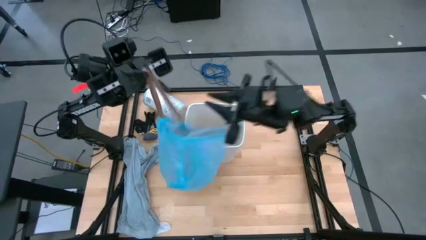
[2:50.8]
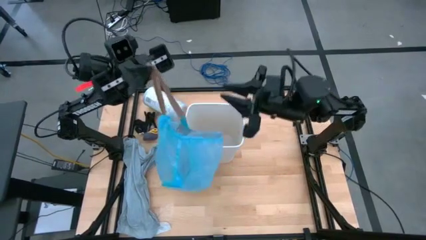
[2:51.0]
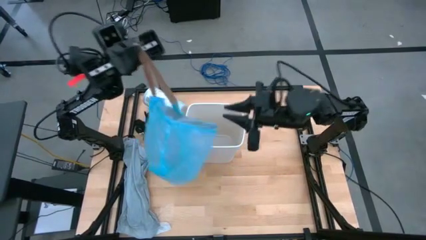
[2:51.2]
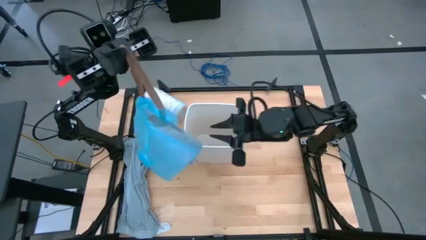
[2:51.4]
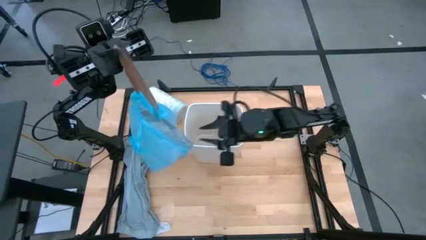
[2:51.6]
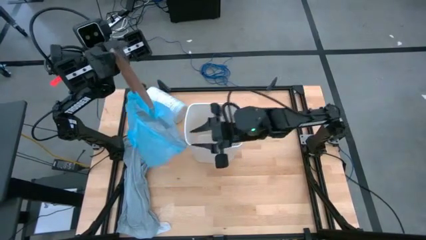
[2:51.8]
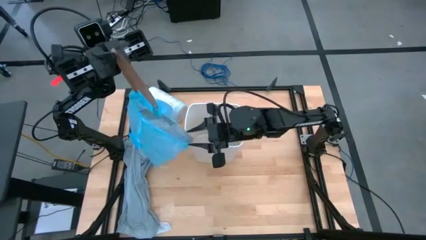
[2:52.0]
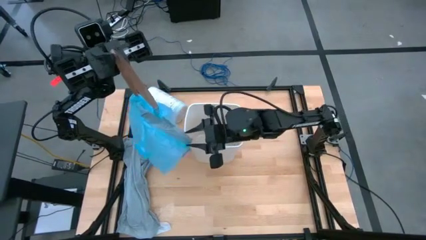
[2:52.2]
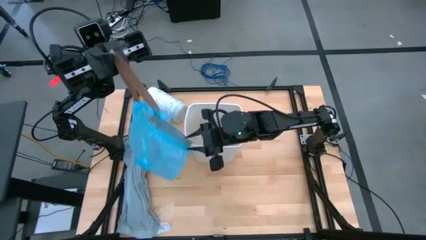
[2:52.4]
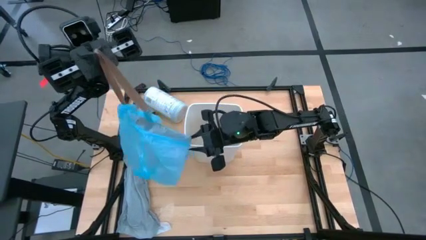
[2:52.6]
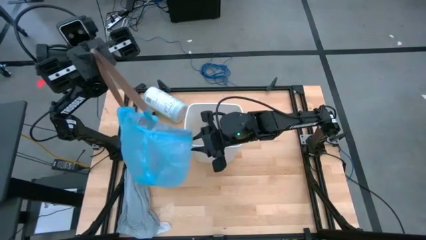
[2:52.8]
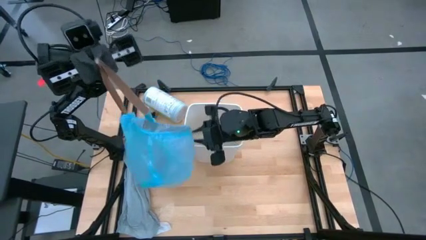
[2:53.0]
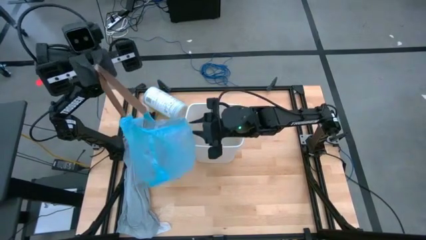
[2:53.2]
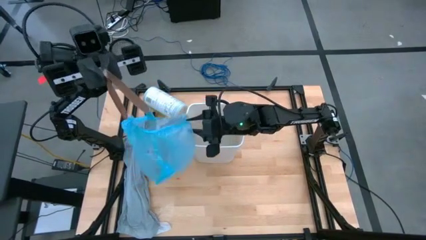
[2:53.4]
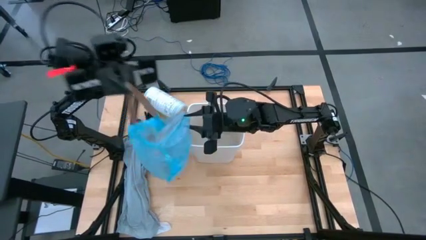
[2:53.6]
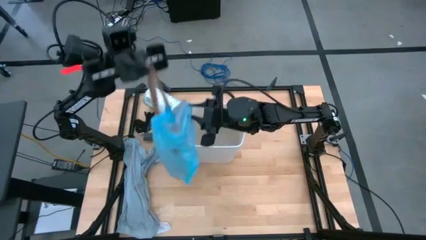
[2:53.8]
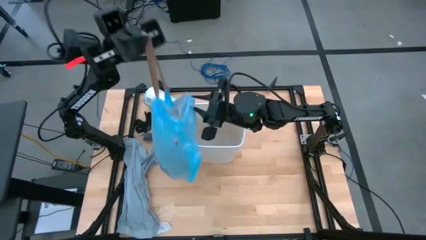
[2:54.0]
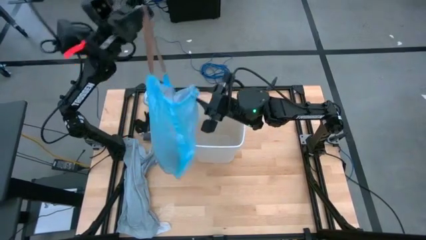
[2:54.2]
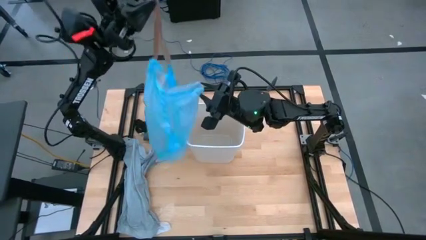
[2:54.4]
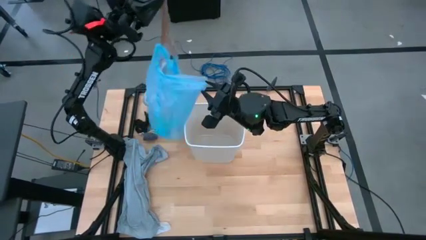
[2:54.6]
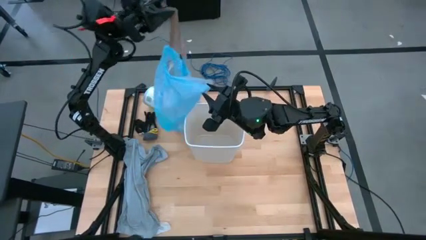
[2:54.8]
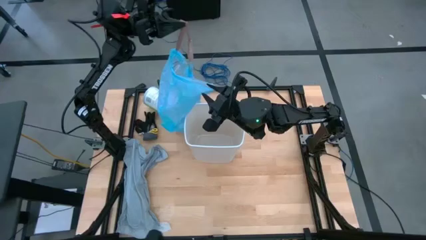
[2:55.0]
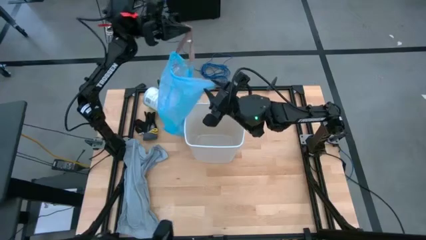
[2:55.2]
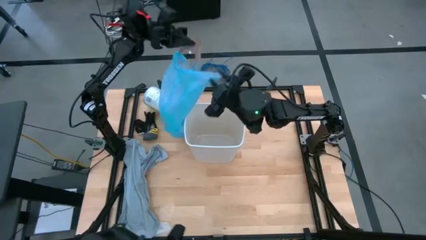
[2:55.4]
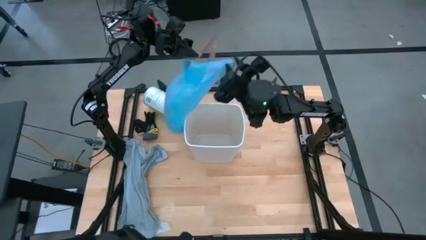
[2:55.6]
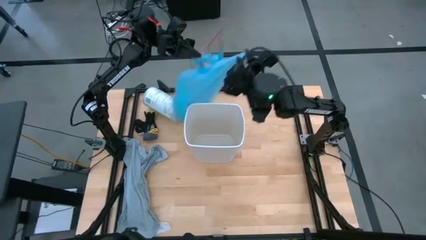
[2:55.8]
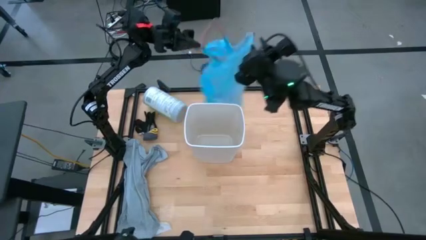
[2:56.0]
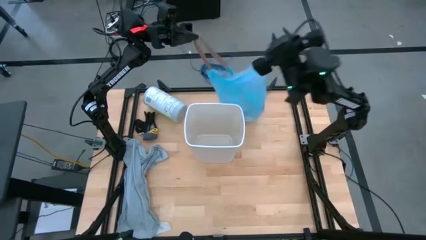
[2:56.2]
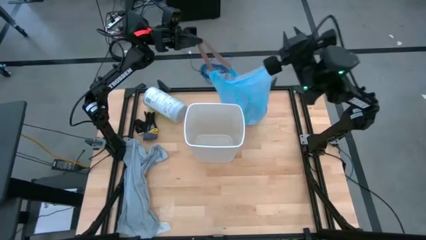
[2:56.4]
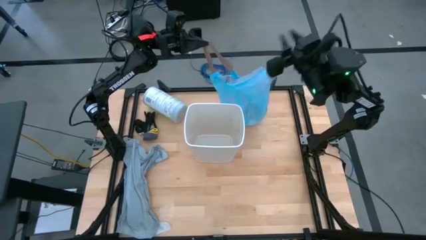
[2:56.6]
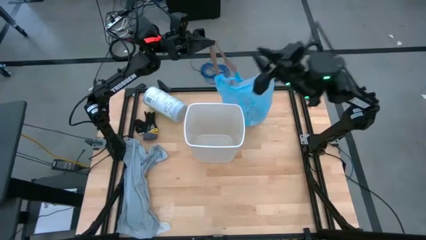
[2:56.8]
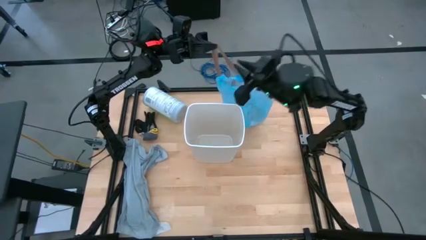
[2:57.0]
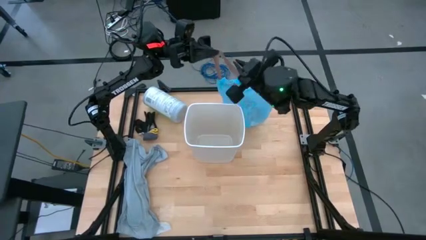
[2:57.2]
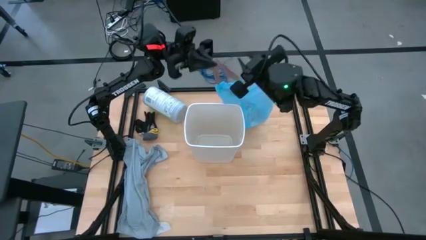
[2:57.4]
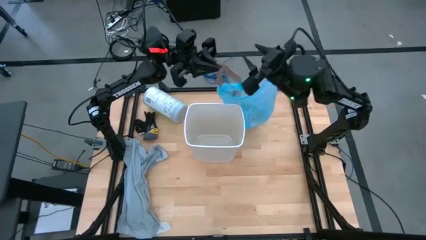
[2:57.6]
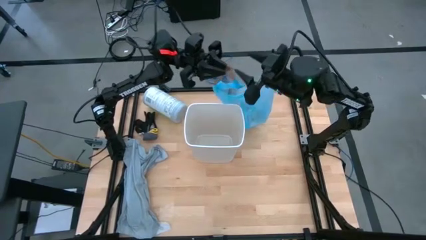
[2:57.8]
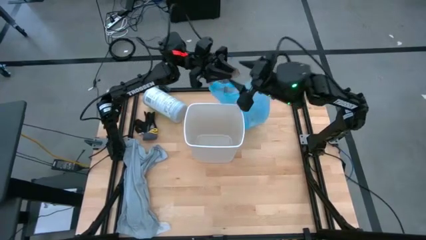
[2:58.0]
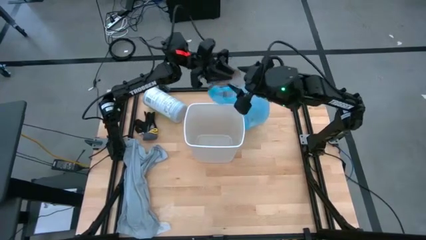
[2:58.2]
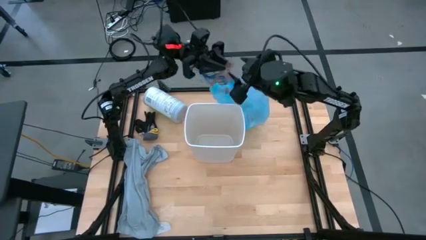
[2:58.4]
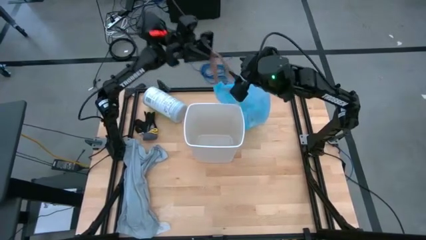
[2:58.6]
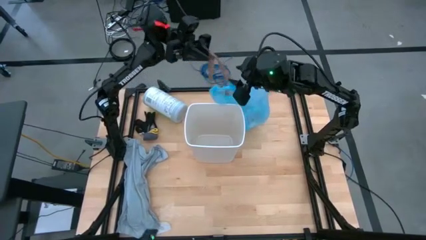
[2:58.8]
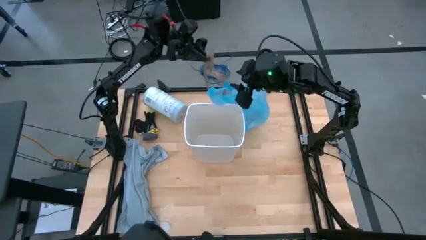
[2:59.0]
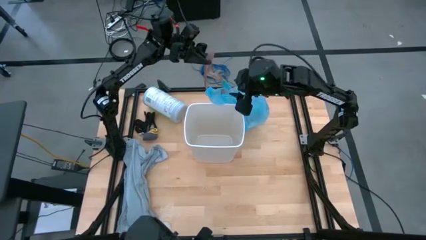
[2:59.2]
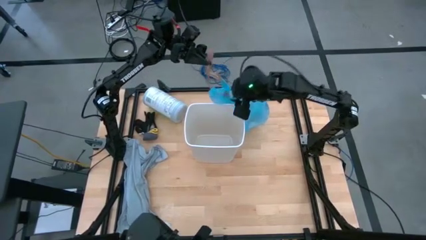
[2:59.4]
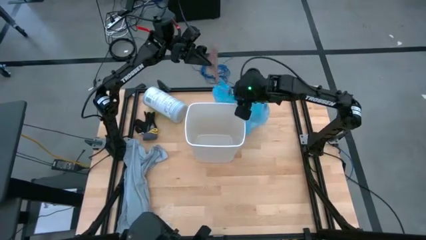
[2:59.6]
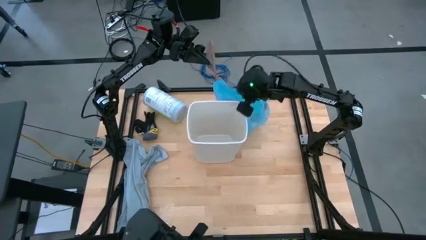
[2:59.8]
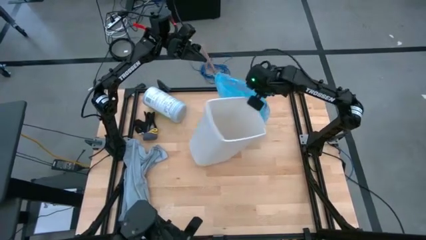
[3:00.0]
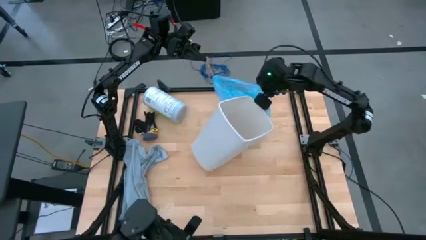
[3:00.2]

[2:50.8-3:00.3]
Task: place trash/remove bag and relplace
Put the blue trash bag on the table

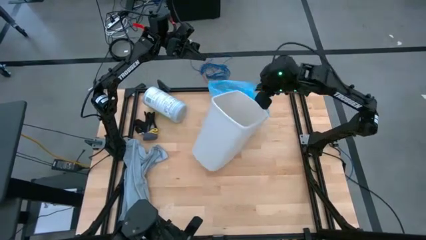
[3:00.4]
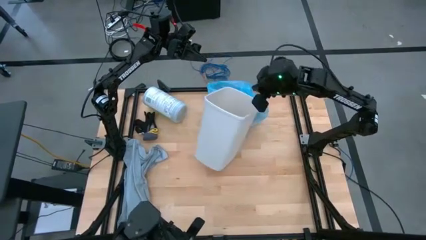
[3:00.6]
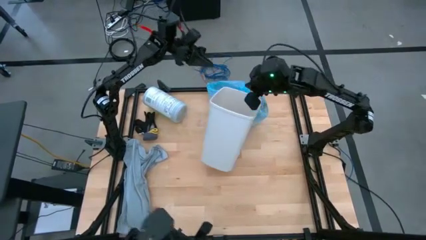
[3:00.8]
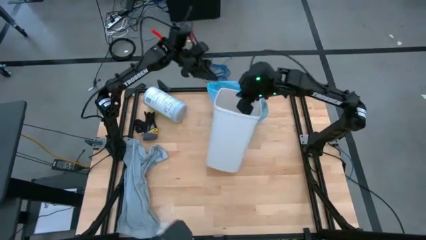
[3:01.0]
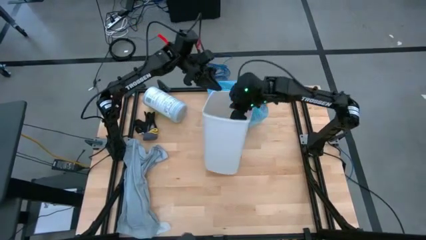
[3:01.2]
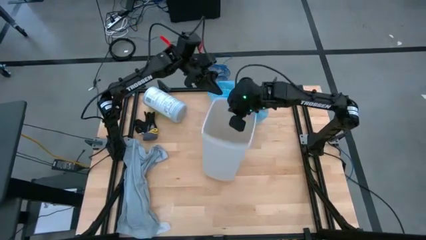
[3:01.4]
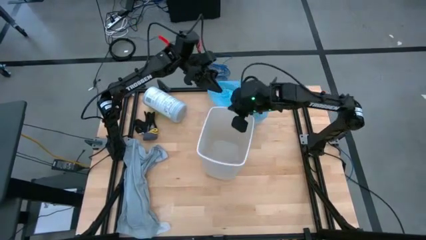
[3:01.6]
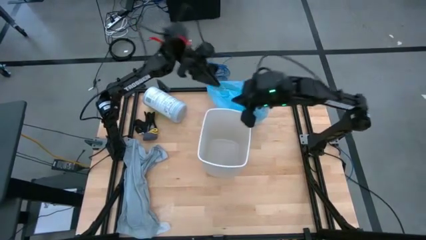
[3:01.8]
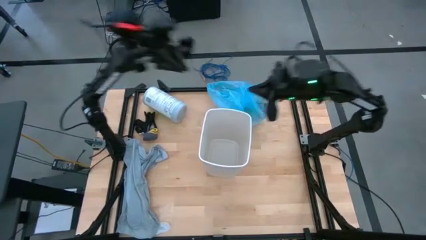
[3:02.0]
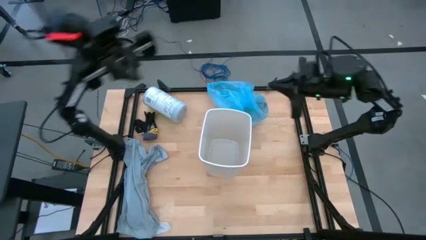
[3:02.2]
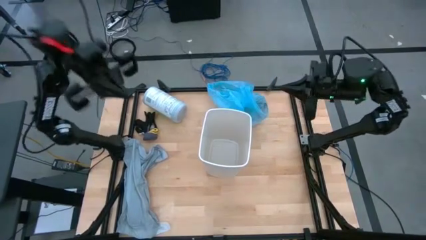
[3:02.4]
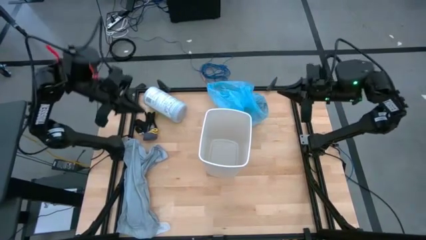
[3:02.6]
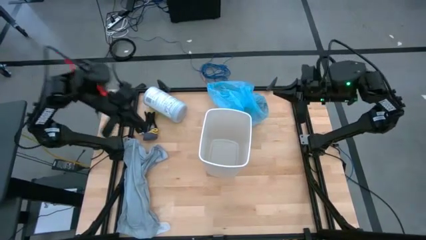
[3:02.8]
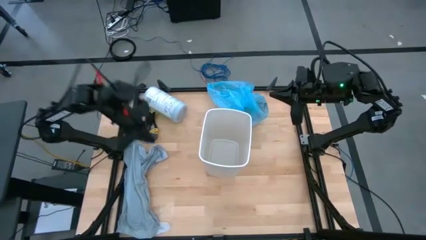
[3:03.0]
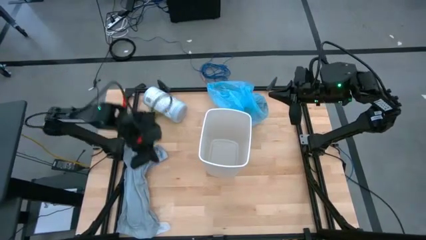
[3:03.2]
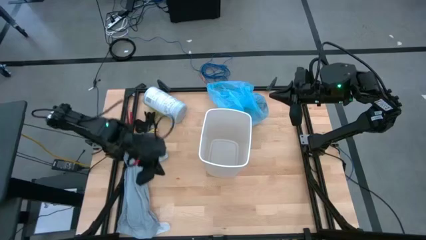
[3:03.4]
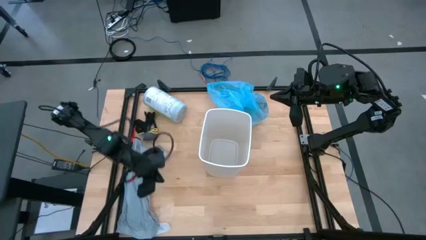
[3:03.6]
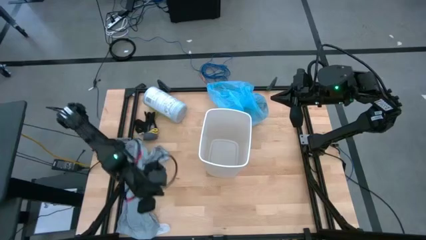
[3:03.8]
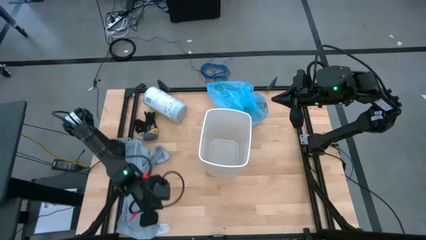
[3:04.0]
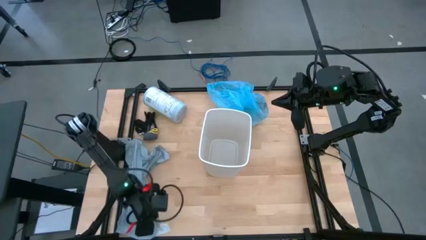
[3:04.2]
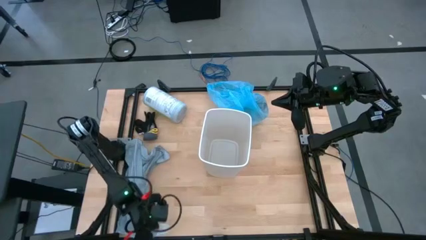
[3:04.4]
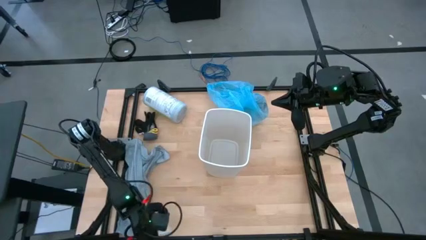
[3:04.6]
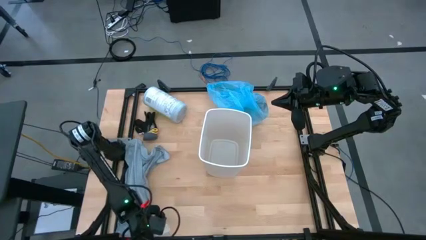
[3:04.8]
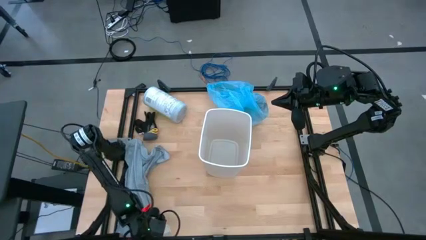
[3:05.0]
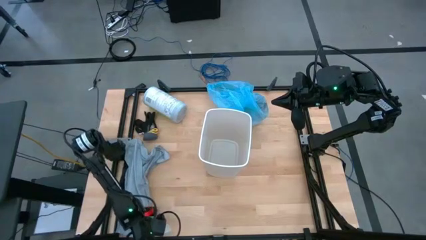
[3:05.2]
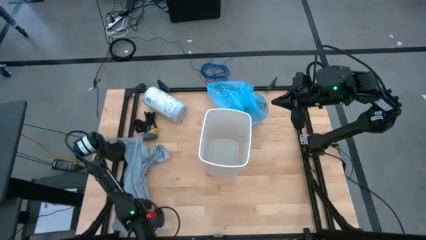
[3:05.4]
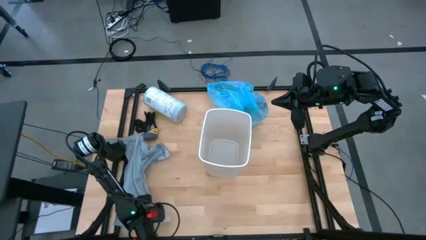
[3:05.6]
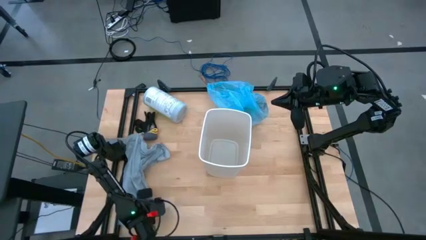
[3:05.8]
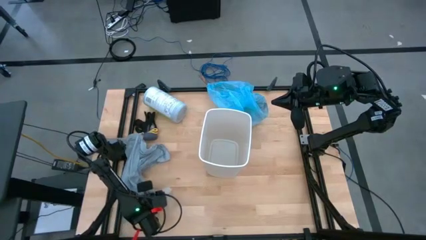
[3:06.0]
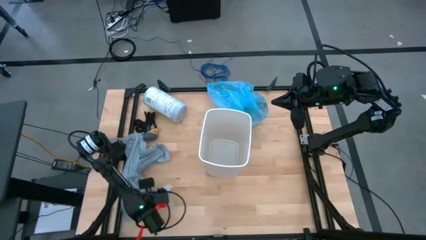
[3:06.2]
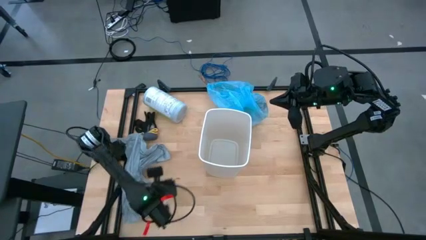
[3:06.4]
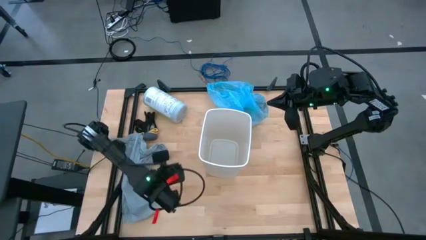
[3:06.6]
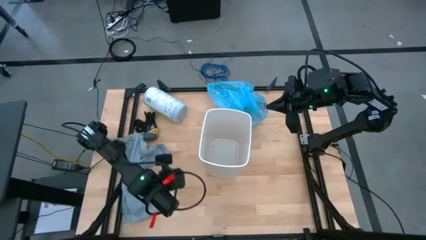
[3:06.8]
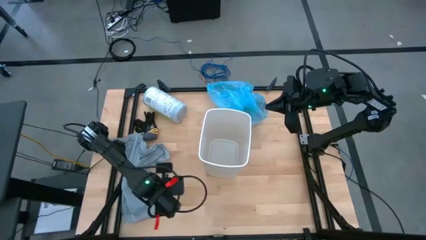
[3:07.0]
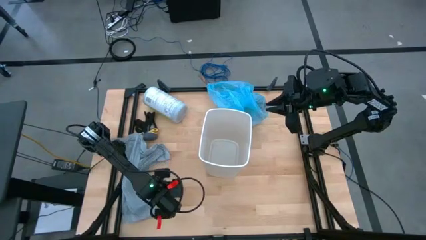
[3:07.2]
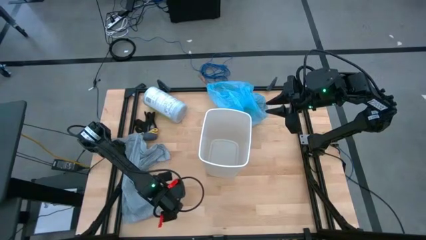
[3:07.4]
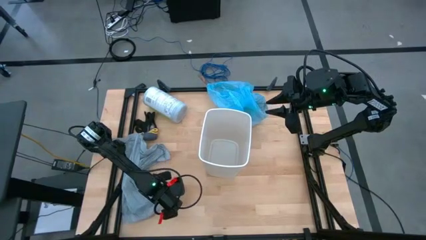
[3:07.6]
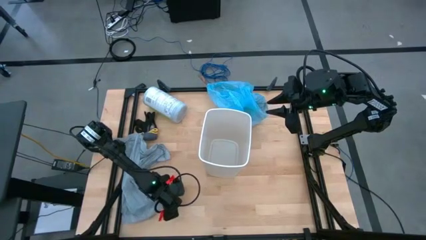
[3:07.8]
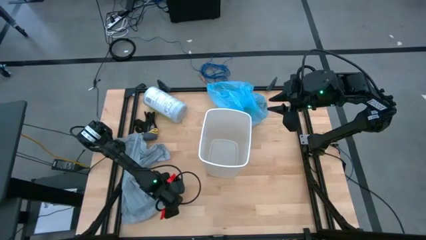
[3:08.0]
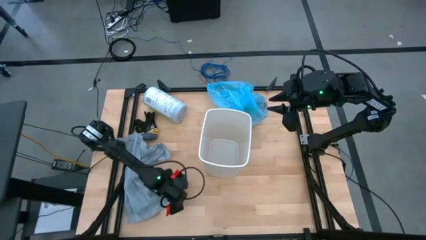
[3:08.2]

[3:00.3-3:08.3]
Put the gray trash bag into the trash bin
